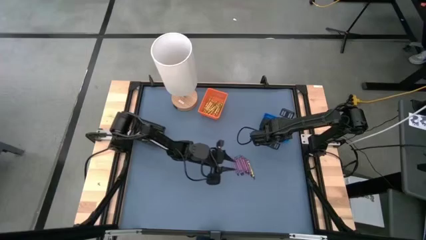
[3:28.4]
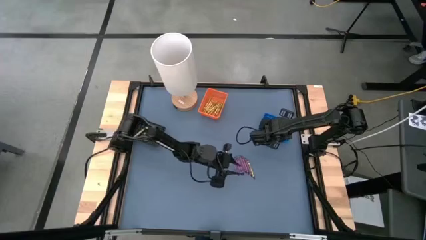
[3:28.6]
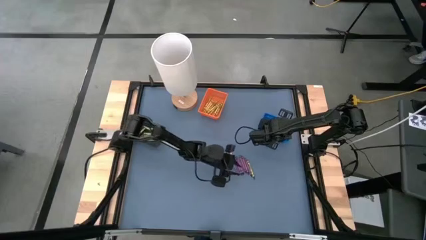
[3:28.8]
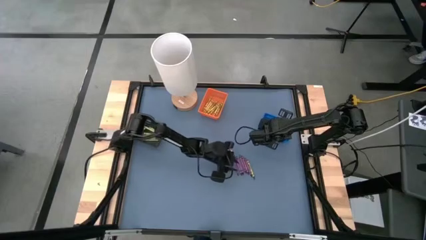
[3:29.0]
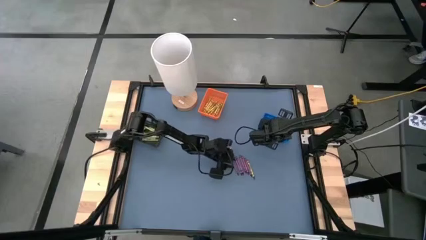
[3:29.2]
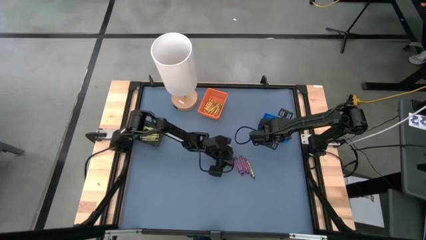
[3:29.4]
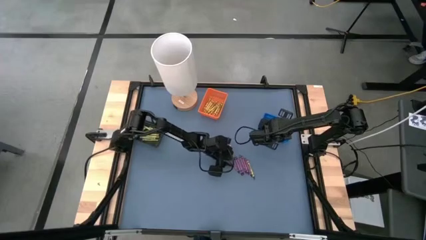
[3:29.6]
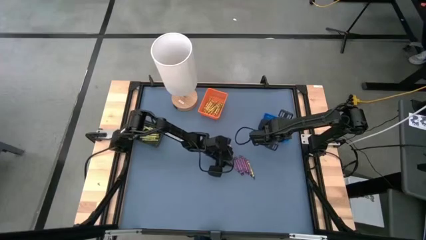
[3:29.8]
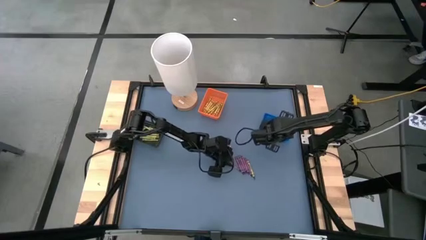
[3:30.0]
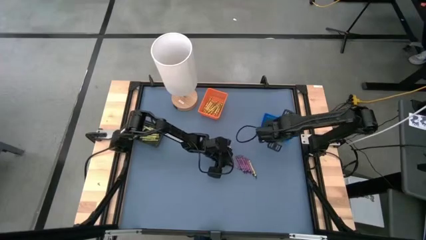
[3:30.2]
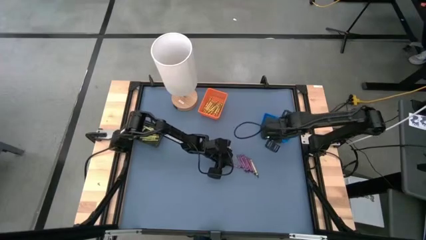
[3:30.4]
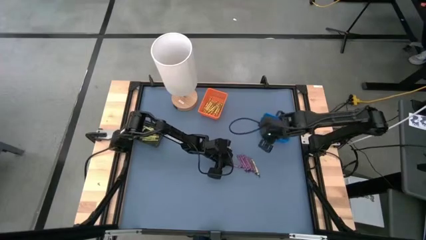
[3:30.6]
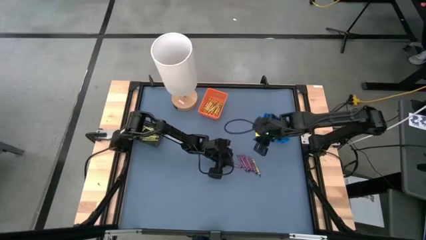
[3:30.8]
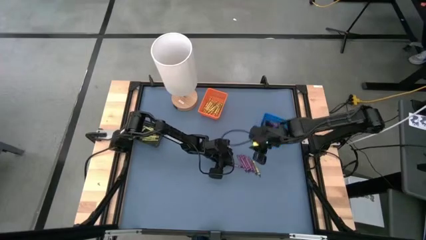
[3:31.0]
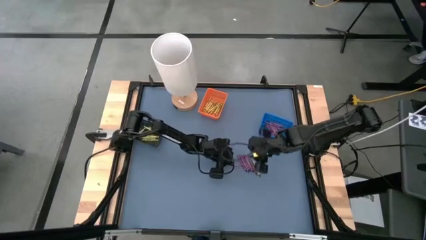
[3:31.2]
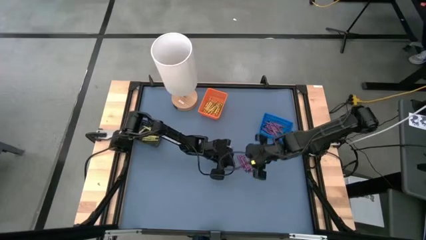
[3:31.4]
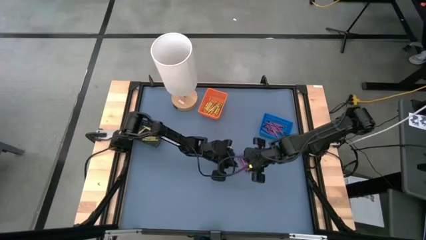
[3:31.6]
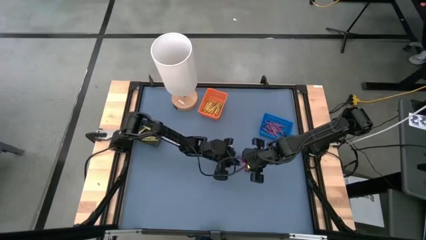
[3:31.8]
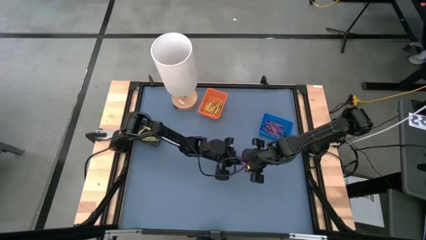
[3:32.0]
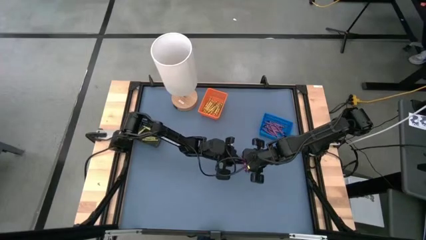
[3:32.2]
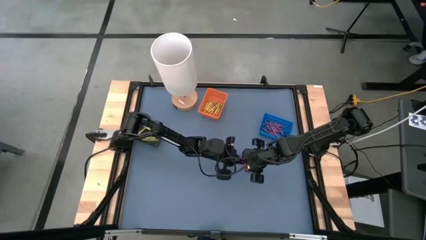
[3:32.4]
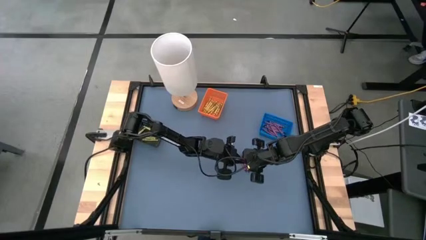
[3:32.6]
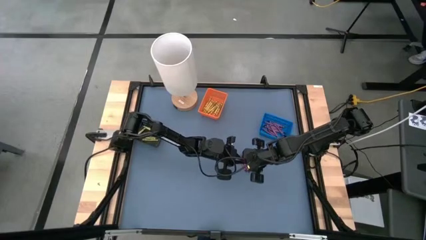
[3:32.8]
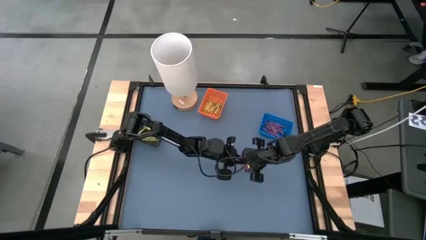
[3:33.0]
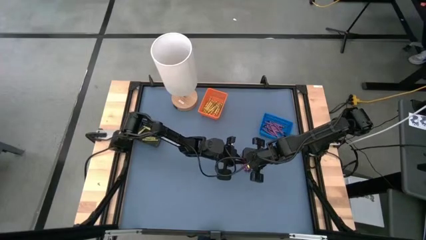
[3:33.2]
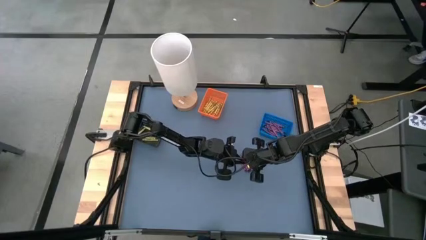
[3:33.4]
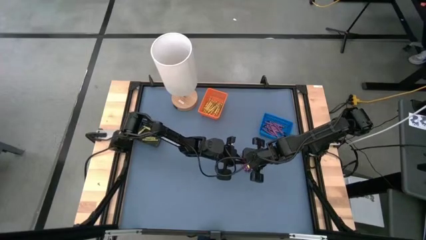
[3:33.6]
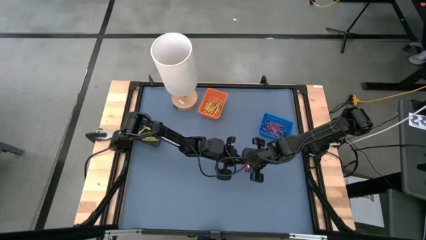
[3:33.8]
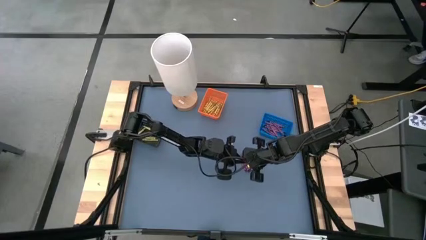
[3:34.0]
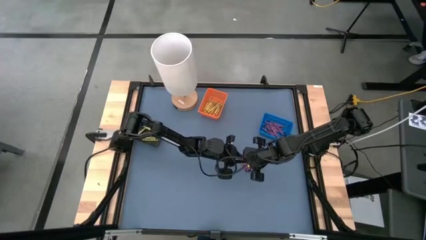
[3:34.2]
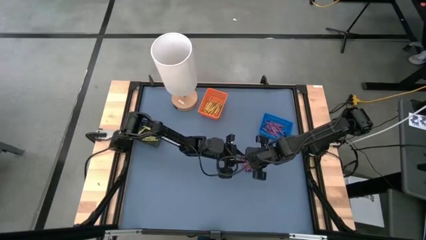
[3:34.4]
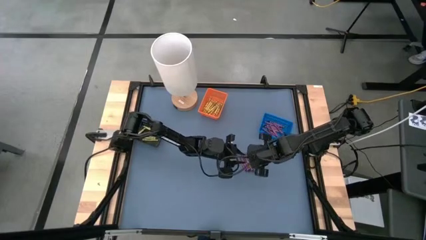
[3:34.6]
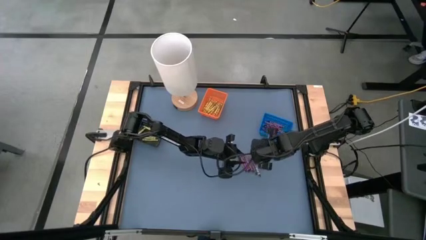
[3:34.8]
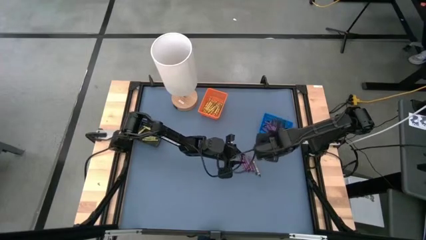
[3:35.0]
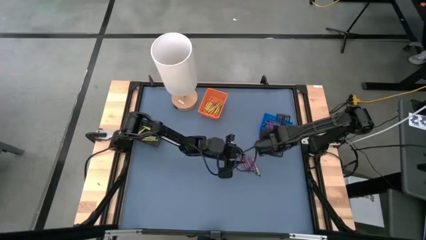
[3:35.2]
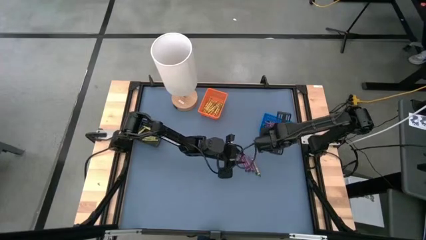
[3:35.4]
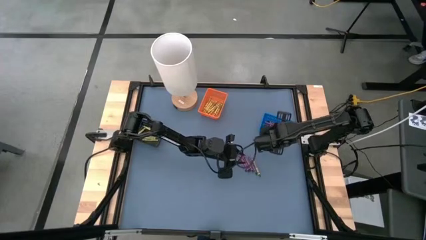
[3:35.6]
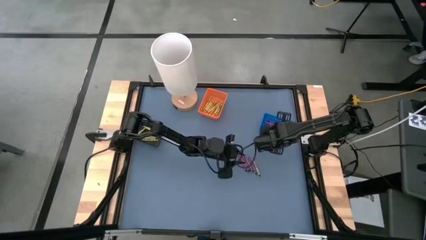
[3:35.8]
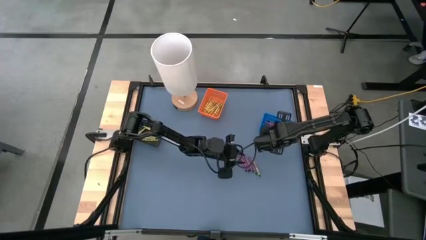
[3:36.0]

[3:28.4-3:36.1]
Task: Sort crayons
Put the violet crayon into the blue basket

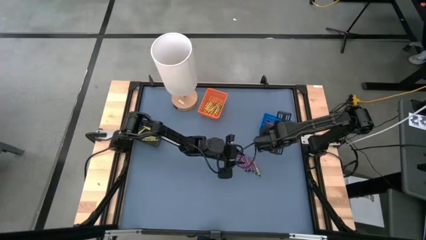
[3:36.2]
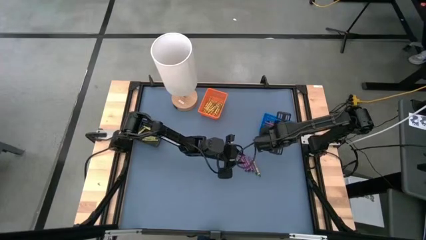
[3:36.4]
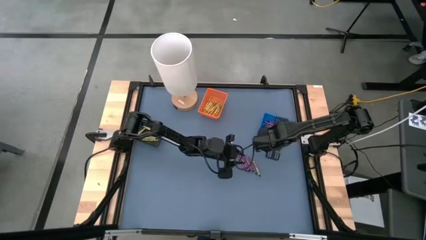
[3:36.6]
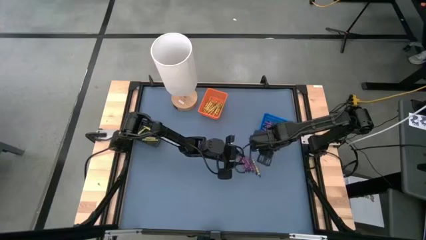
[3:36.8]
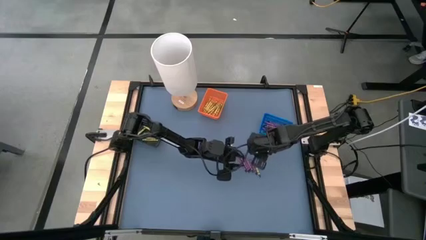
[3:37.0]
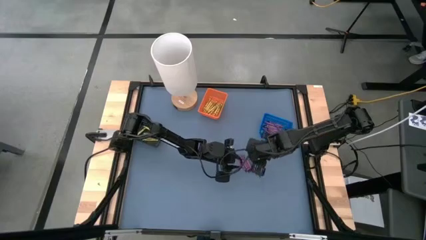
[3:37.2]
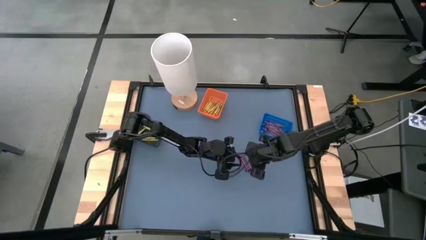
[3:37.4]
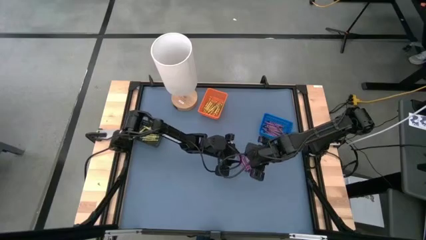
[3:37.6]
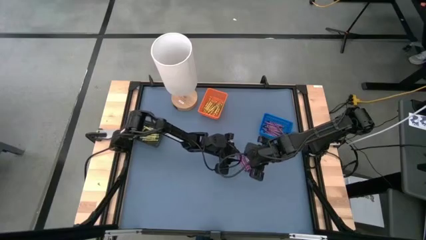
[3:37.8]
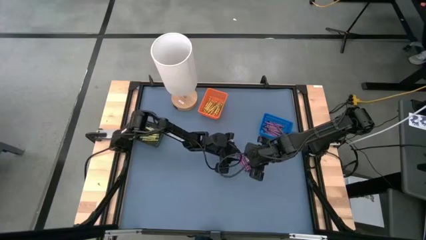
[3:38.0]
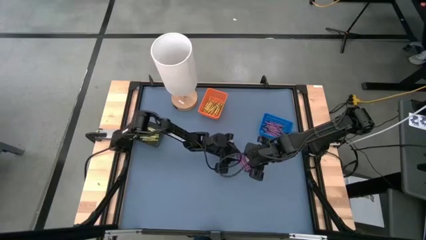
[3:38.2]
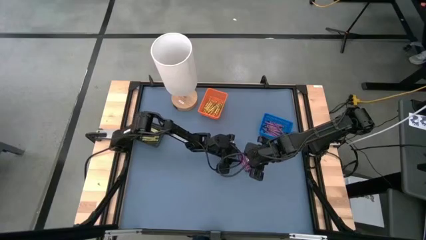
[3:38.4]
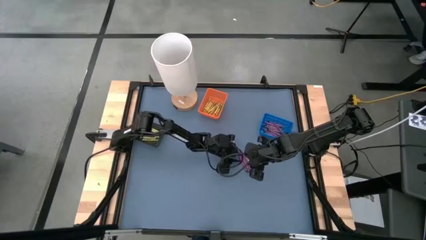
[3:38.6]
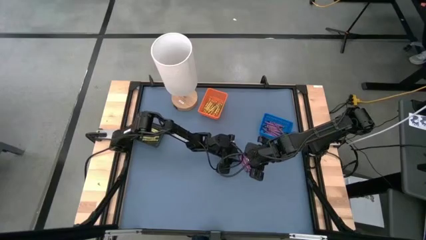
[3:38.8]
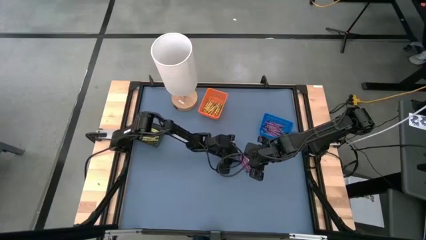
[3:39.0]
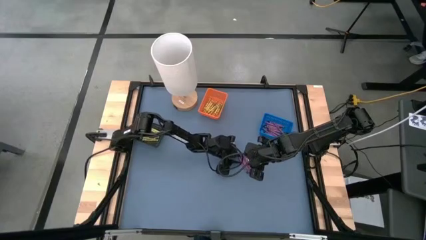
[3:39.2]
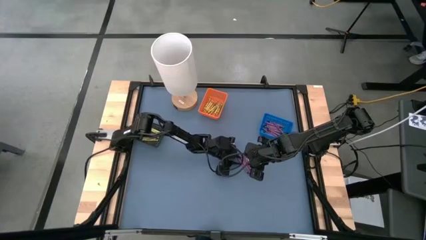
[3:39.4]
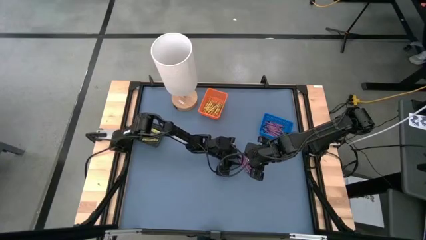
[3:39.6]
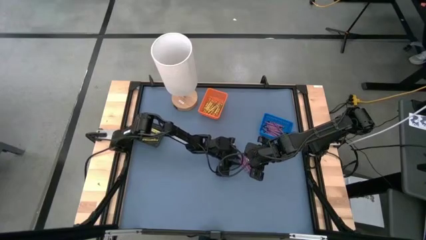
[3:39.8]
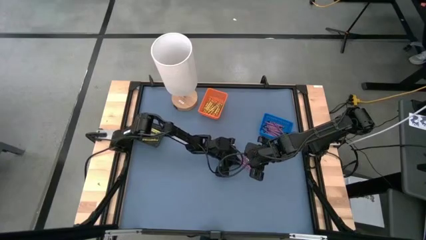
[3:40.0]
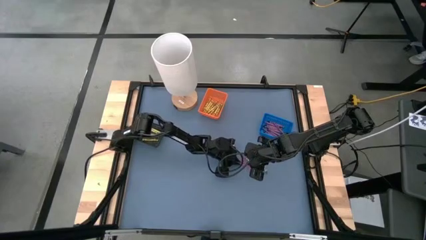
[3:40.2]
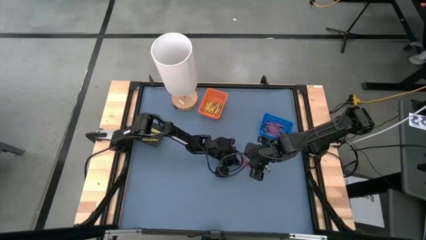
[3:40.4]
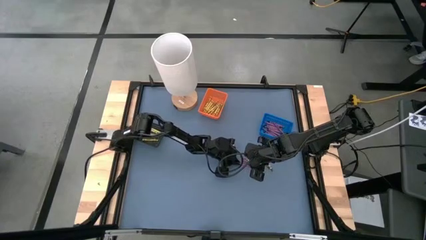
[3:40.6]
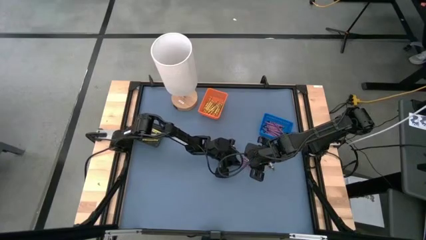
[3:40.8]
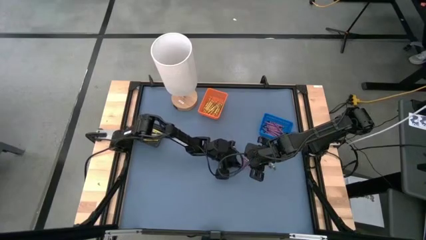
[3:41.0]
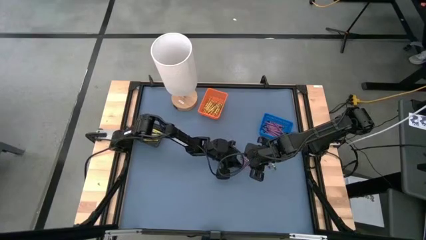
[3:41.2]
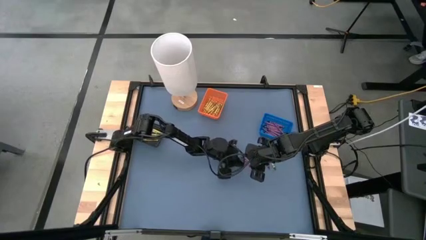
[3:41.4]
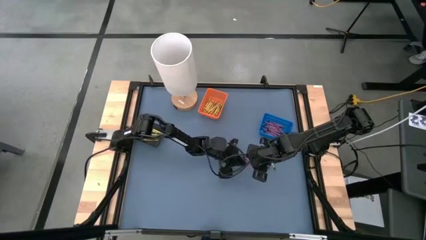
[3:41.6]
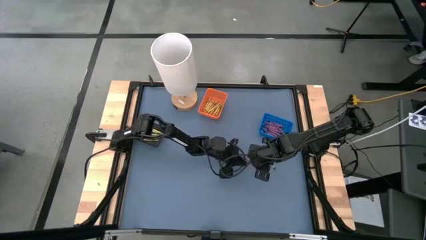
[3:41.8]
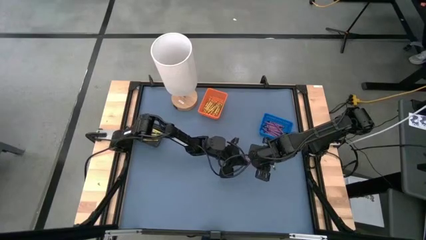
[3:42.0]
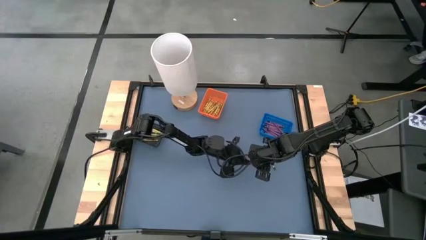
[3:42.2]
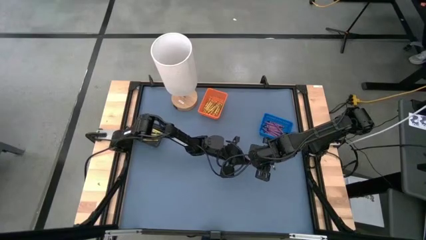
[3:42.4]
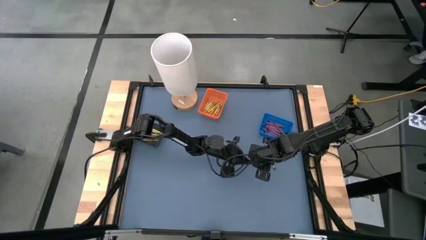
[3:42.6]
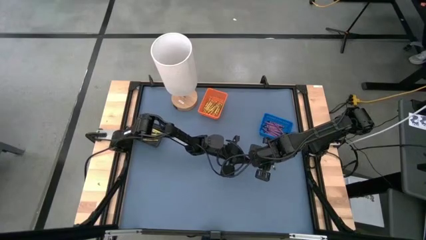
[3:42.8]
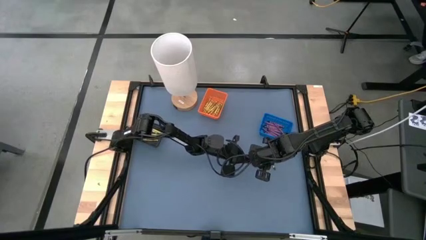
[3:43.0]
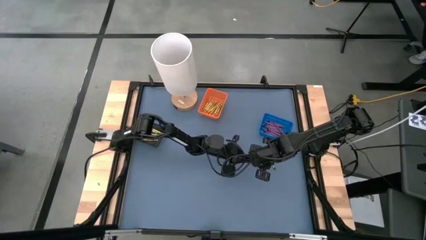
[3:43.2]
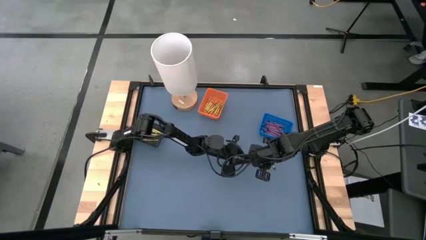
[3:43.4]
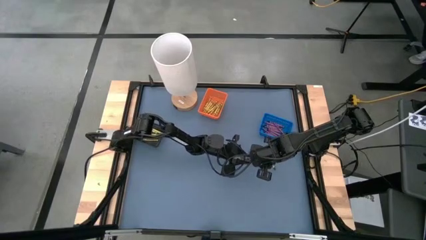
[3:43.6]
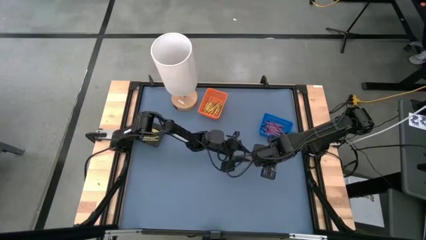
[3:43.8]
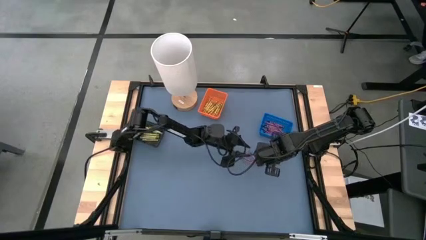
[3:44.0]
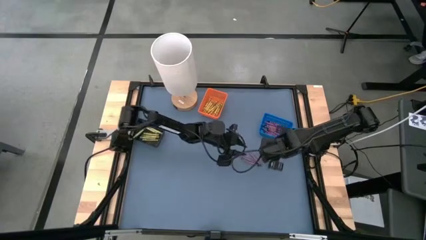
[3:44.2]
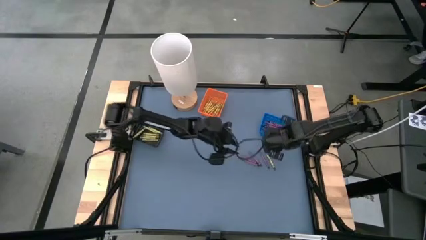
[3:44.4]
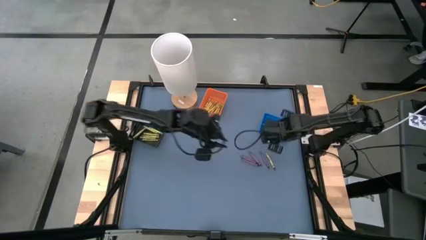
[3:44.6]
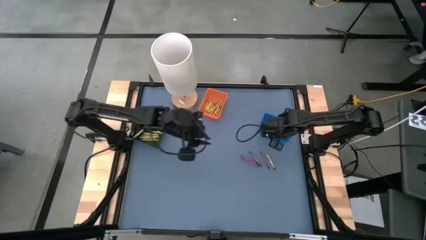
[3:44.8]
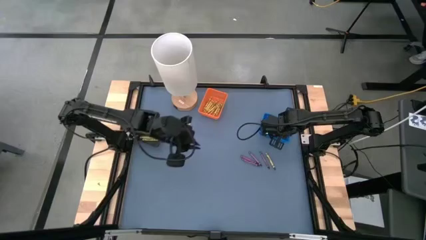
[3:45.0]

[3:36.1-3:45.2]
Put the violet crayon into the blue basket
